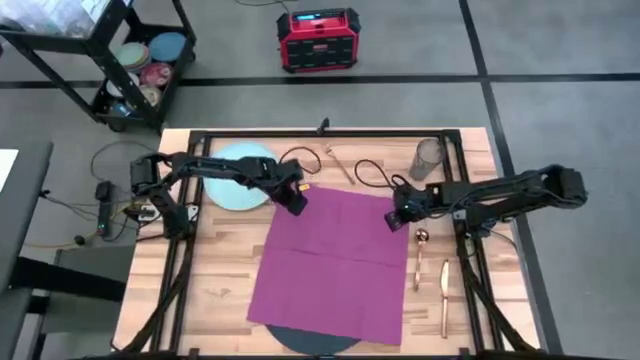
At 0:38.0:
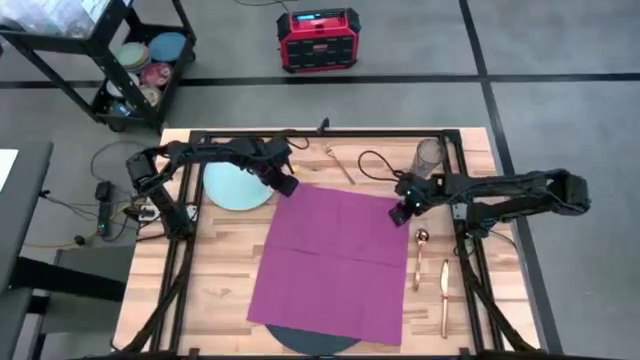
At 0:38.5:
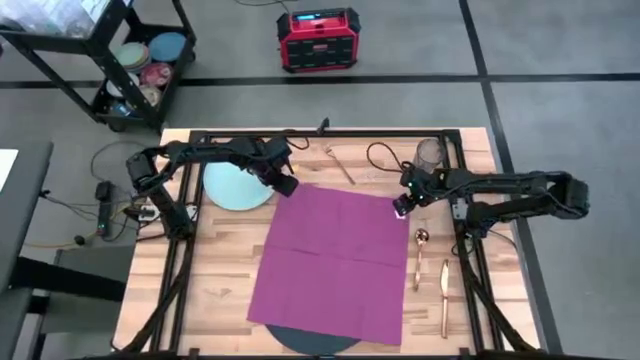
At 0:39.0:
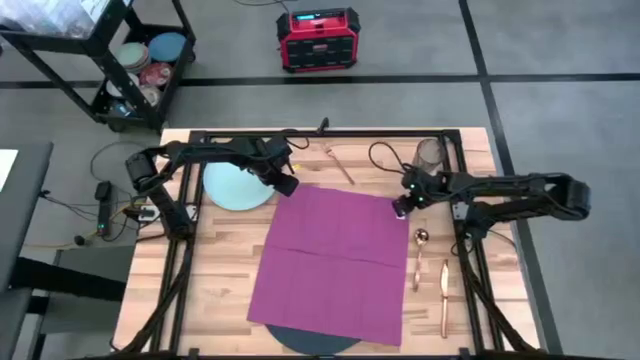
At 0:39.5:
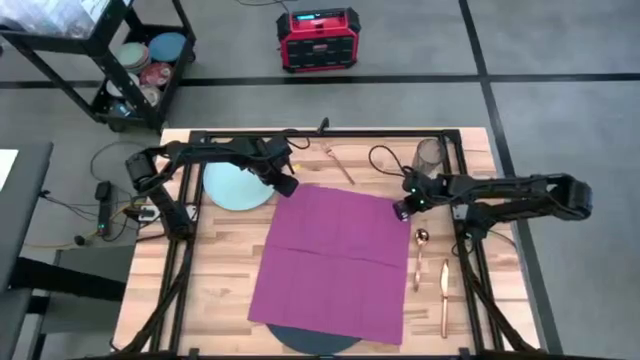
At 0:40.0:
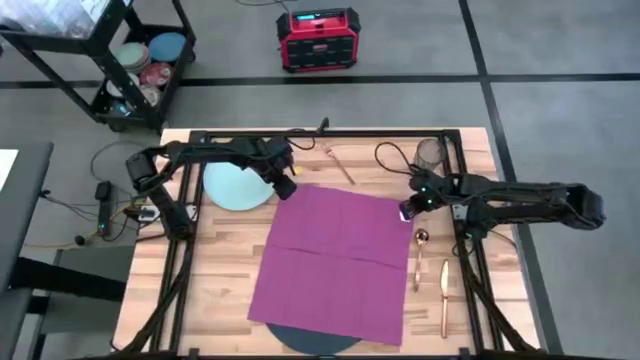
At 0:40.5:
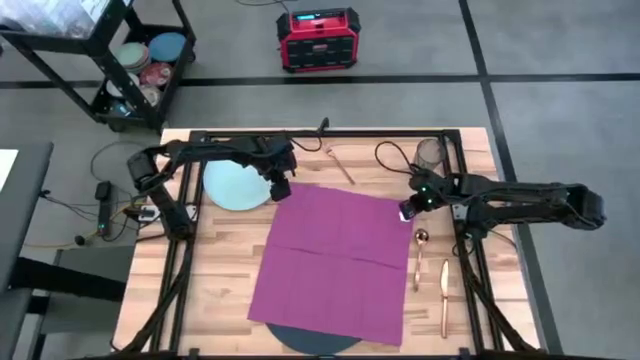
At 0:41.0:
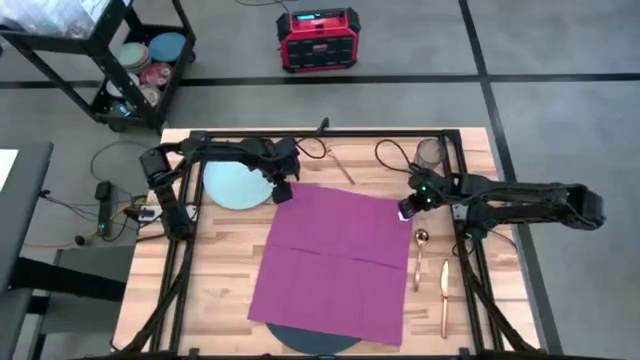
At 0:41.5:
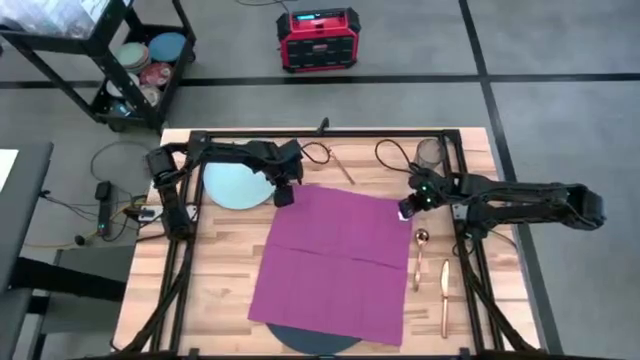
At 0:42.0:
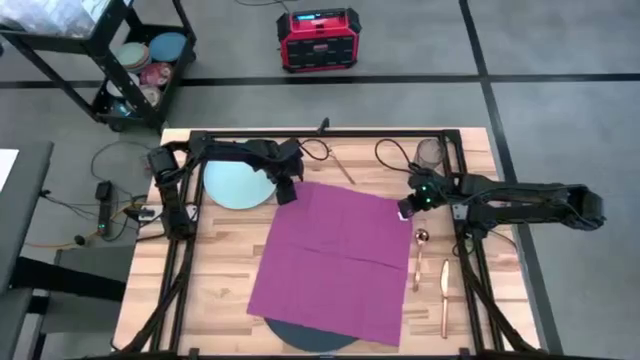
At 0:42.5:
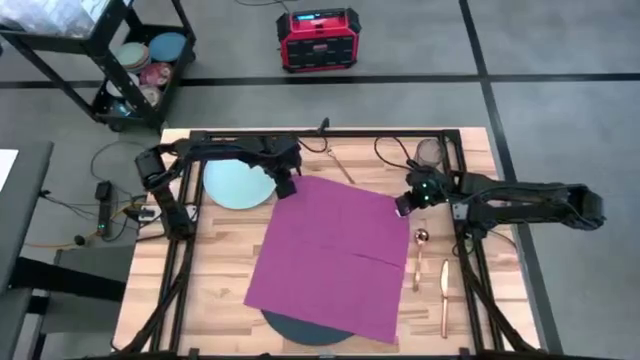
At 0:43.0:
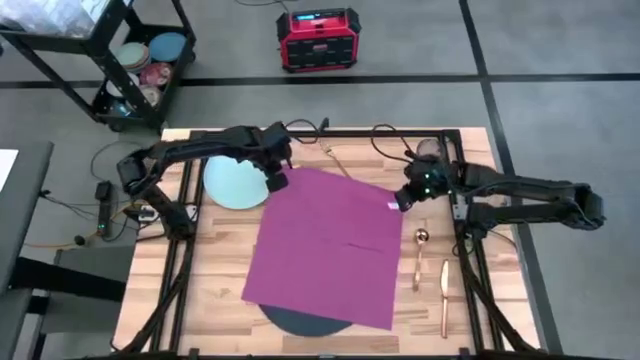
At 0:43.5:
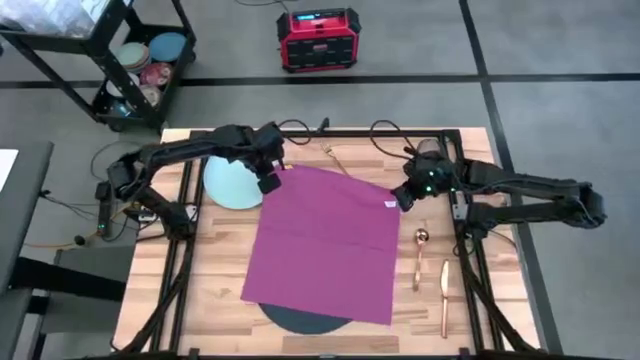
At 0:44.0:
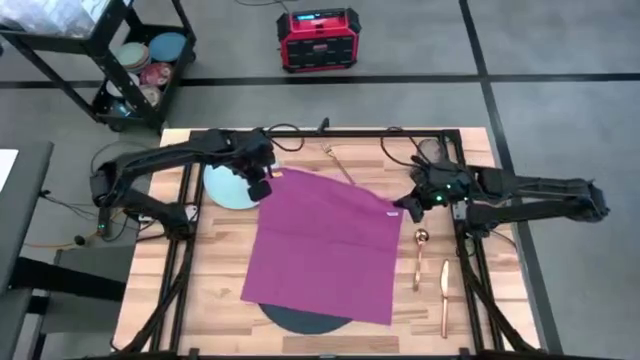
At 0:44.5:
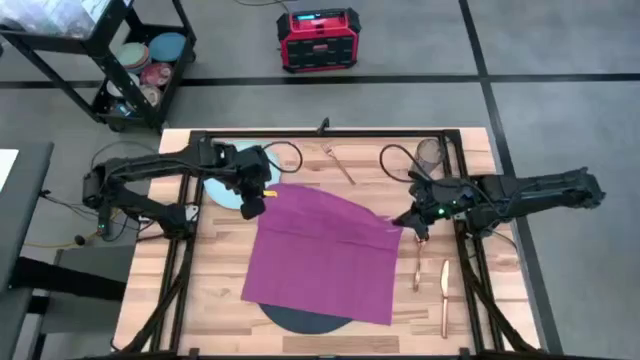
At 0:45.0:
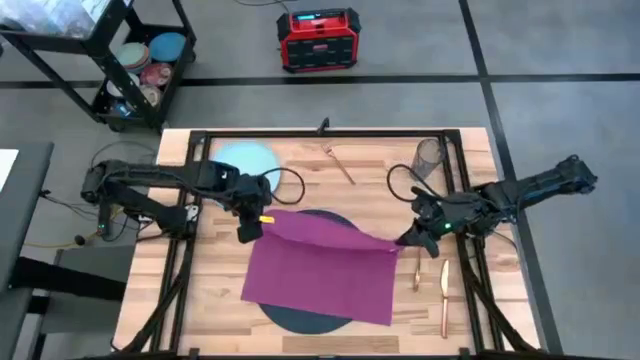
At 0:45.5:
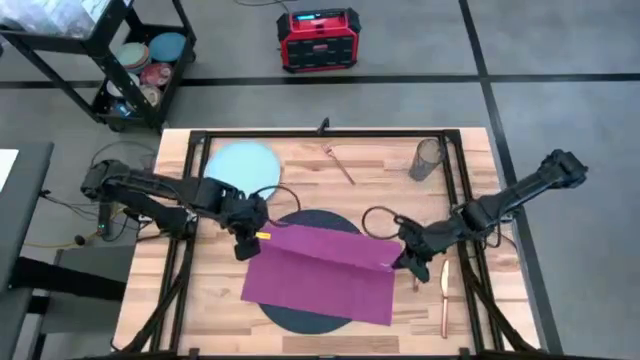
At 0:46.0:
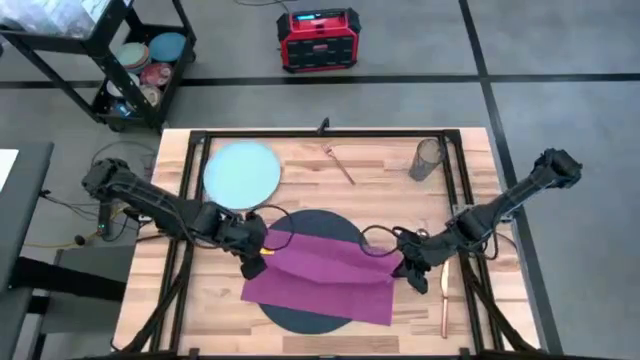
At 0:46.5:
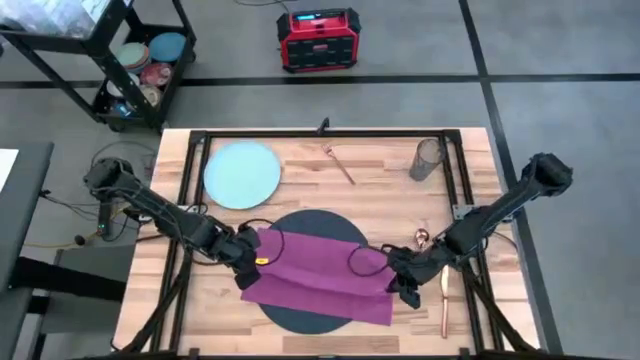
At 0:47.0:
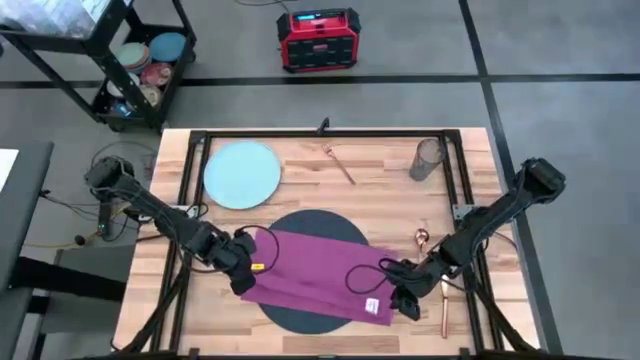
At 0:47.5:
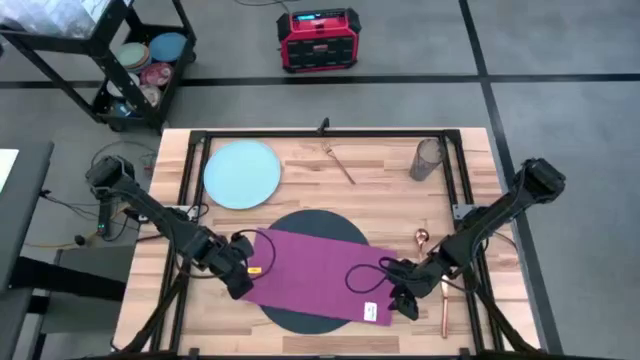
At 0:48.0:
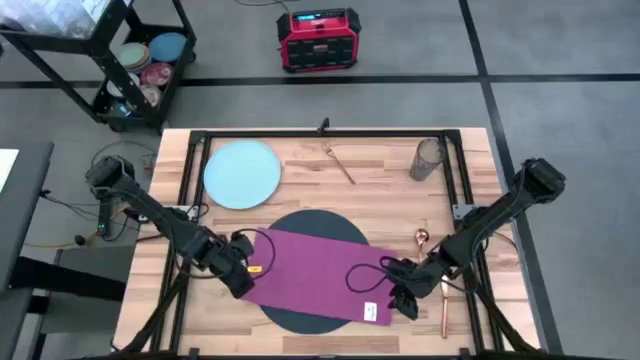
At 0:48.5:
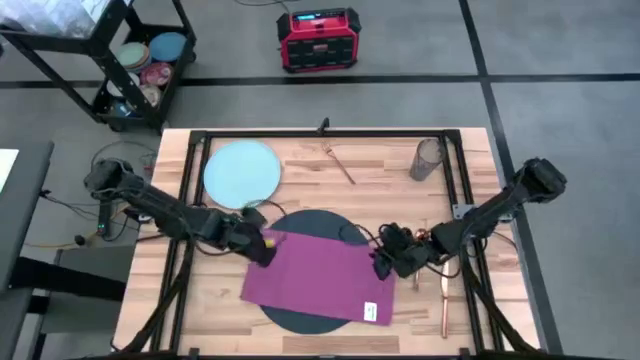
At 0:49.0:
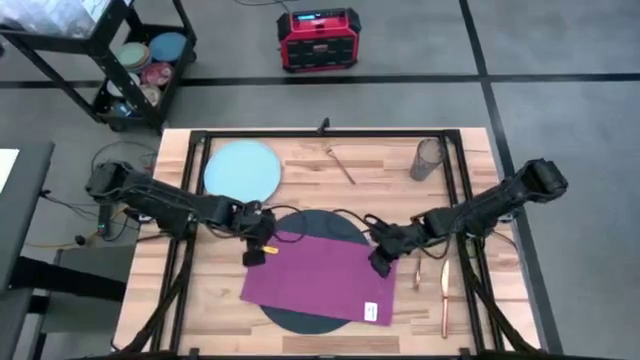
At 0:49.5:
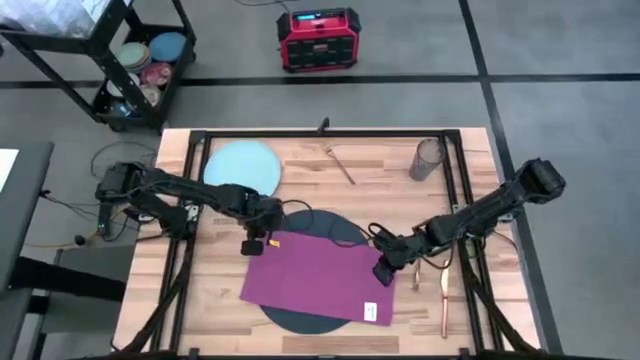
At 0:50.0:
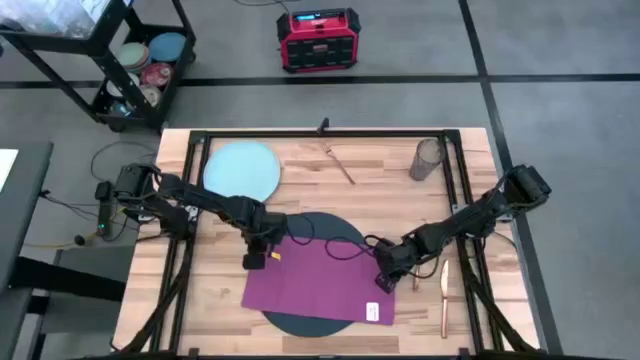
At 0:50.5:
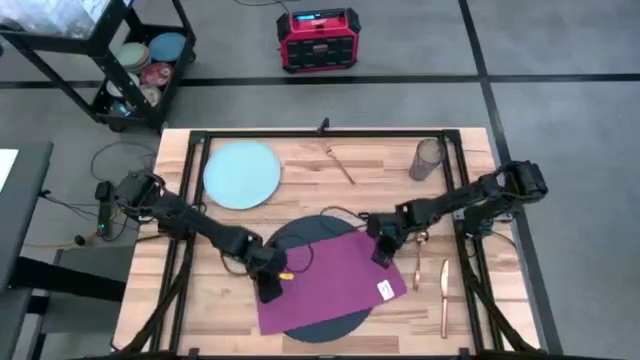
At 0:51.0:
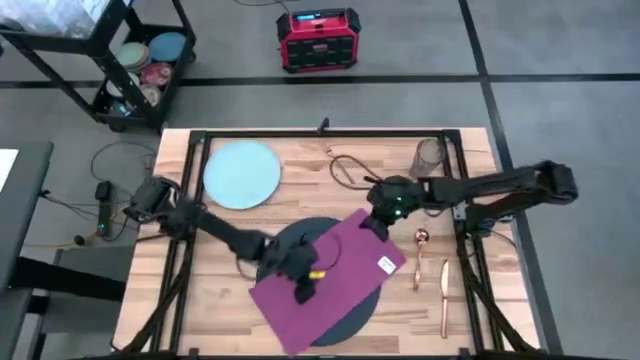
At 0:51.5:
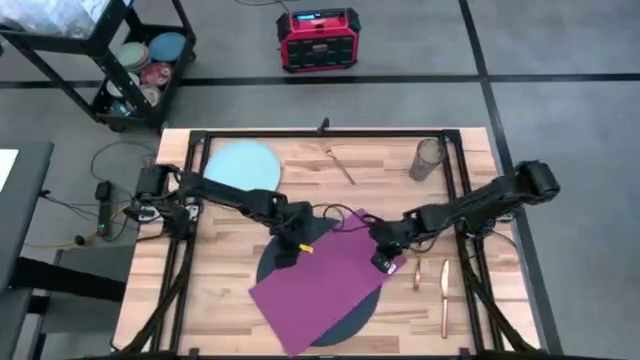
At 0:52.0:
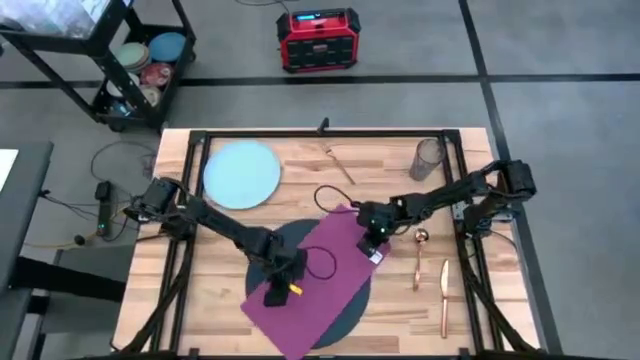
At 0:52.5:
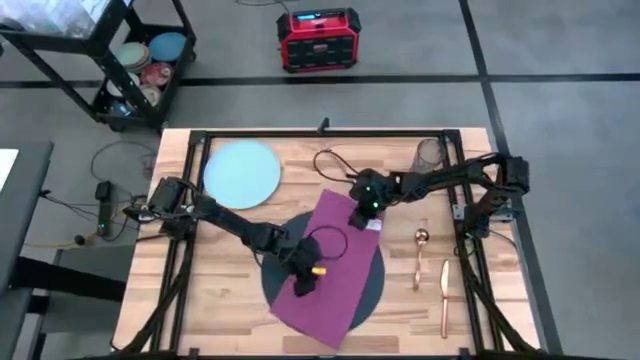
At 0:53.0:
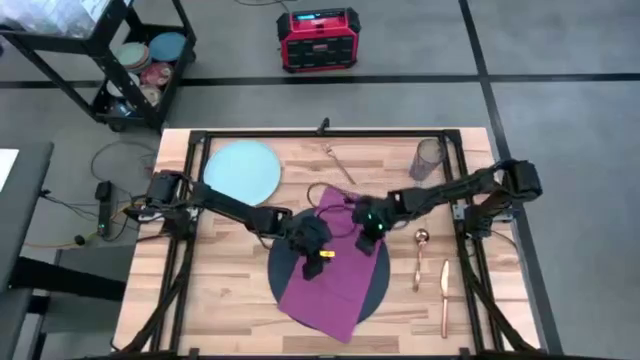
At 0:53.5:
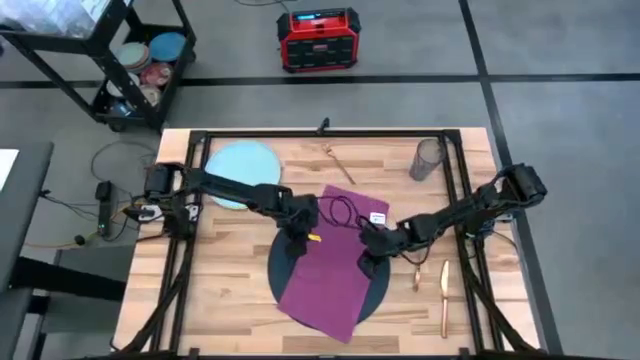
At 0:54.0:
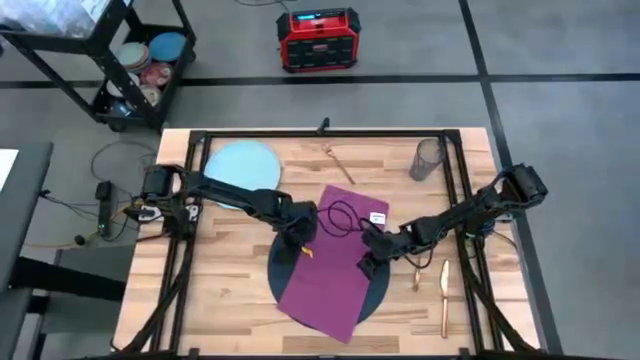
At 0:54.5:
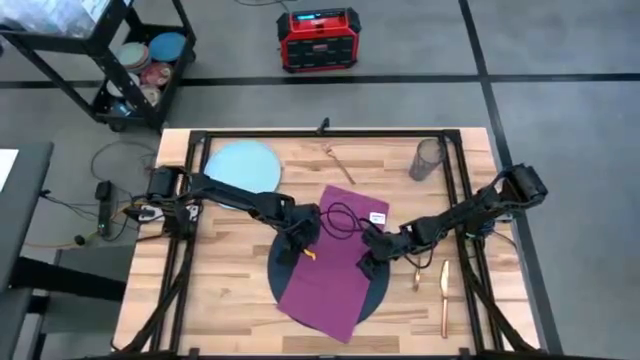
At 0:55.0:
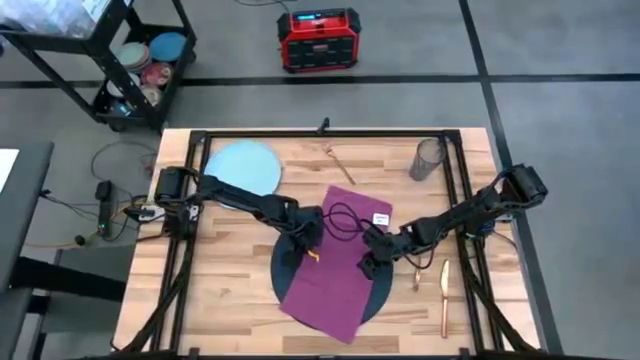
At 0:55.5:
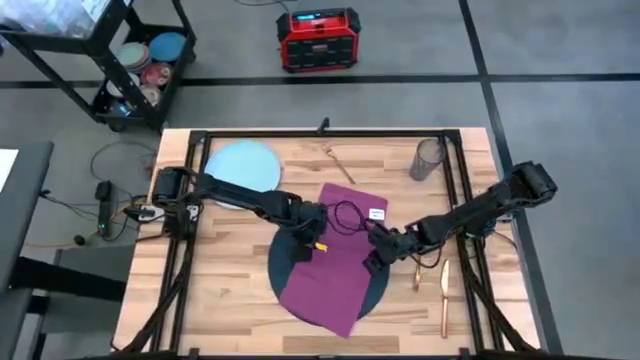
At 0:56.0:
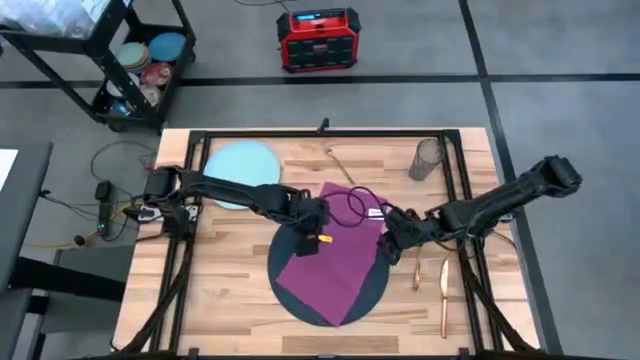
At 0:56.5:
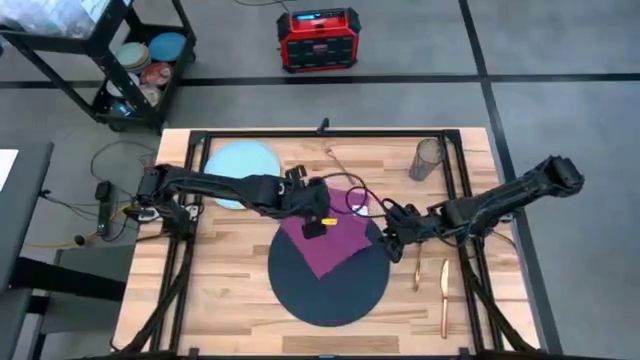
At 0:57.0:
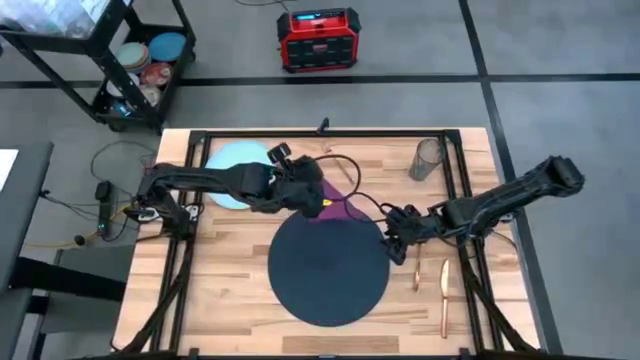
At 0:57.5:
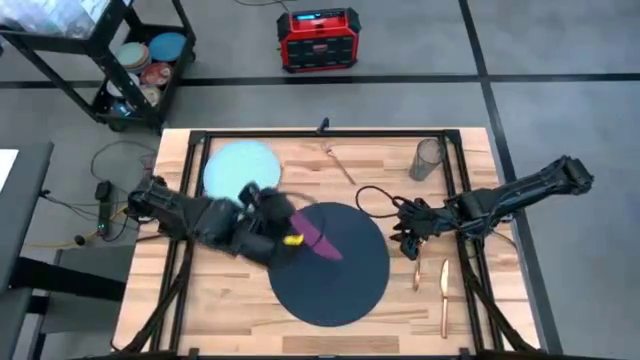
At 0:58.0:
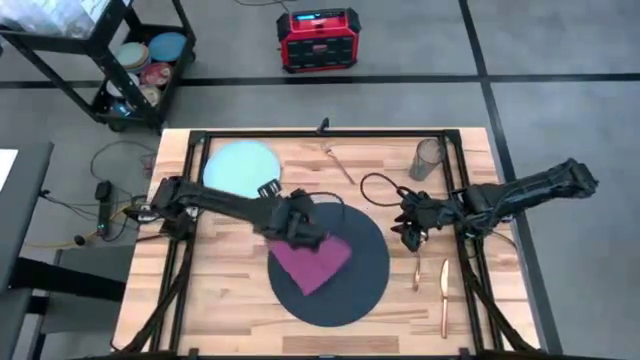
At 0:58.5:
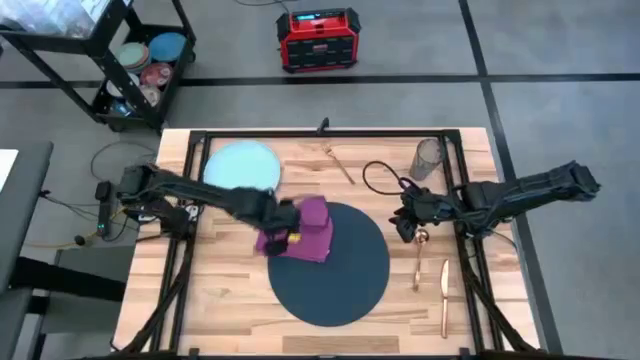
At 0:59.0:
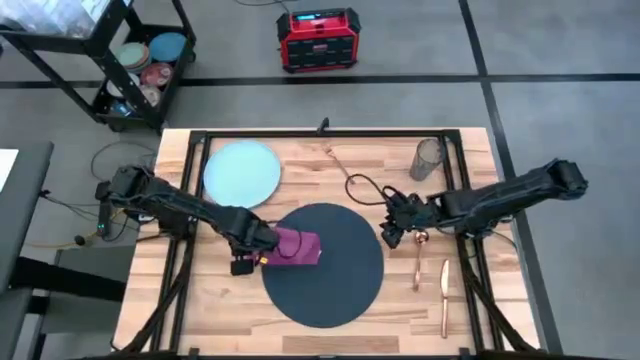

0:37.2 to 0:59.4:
Task: Set table place
Fold the pink table napkin
